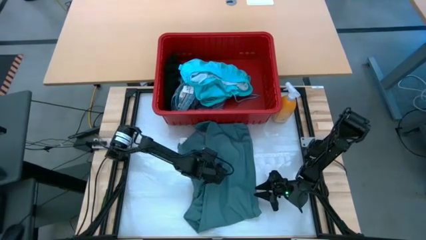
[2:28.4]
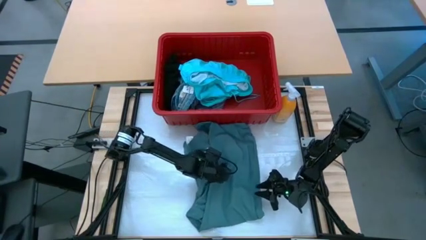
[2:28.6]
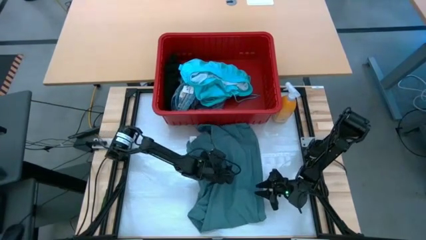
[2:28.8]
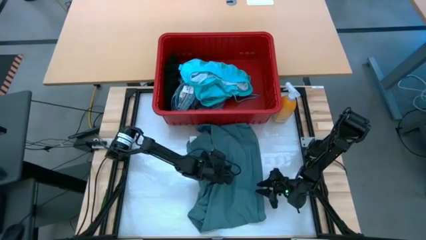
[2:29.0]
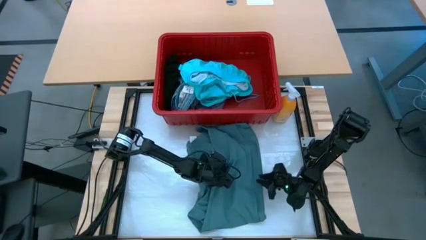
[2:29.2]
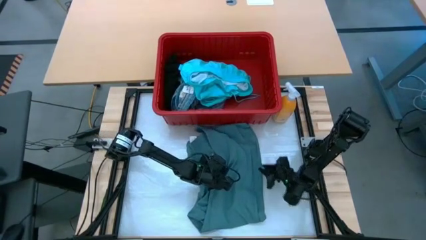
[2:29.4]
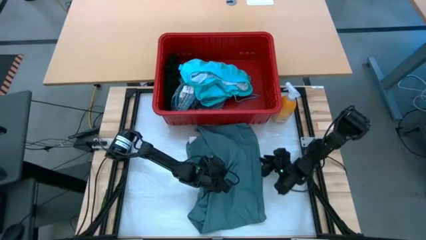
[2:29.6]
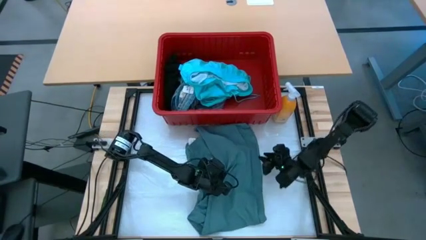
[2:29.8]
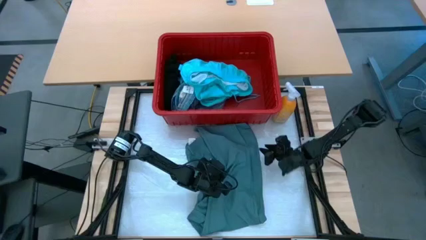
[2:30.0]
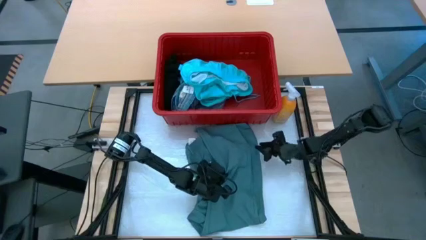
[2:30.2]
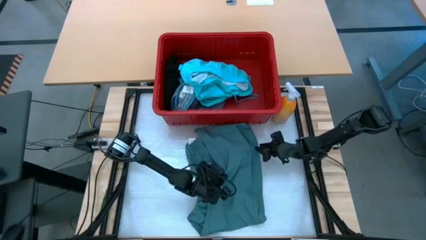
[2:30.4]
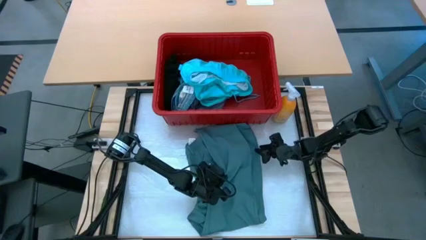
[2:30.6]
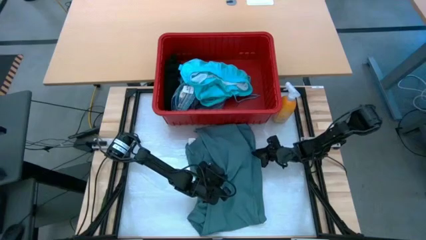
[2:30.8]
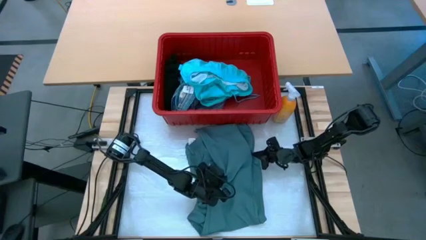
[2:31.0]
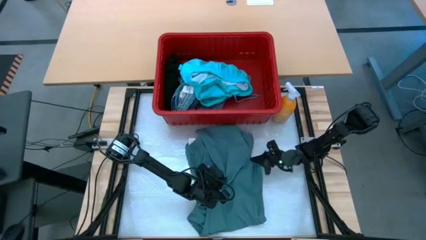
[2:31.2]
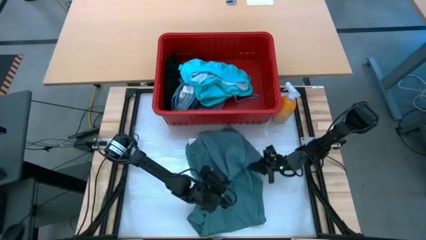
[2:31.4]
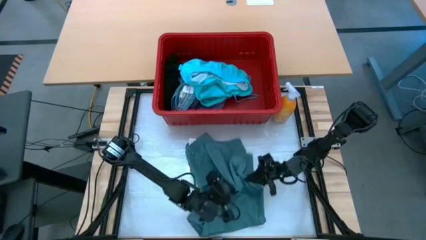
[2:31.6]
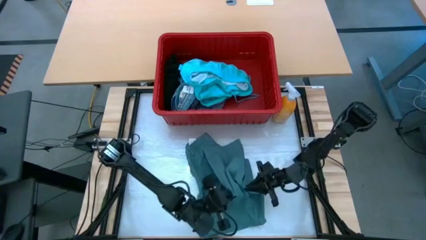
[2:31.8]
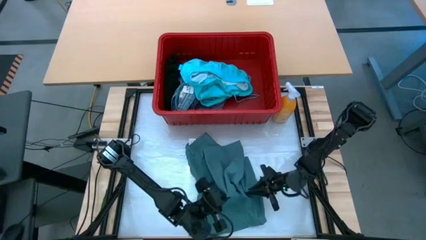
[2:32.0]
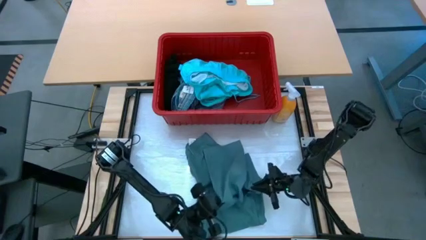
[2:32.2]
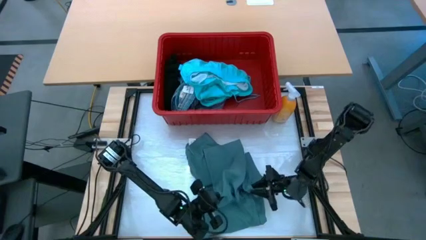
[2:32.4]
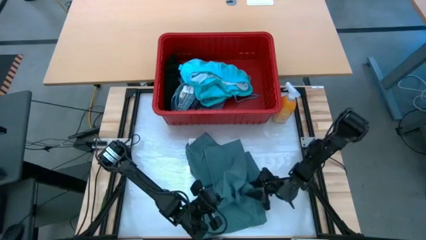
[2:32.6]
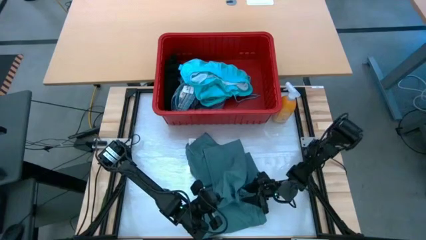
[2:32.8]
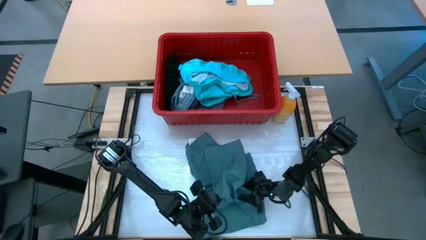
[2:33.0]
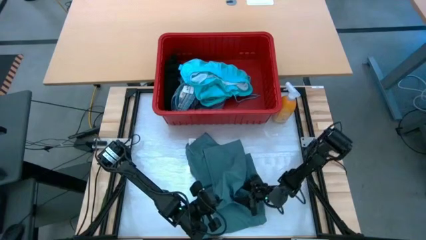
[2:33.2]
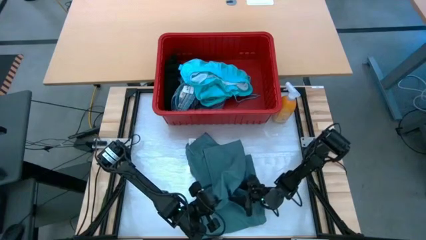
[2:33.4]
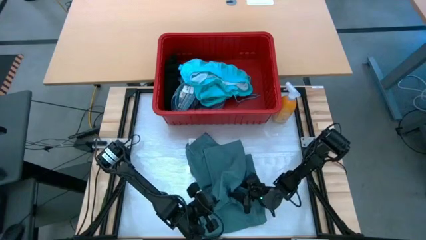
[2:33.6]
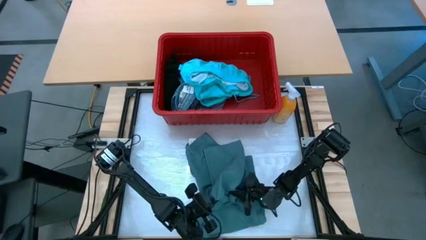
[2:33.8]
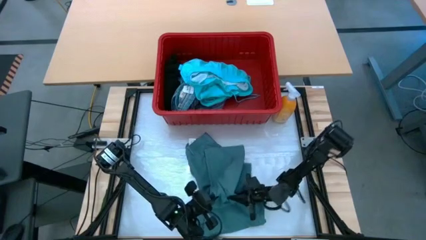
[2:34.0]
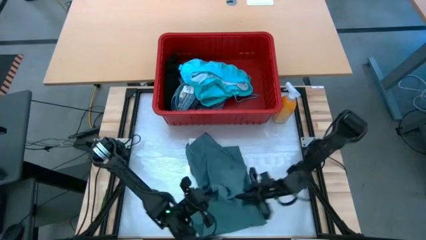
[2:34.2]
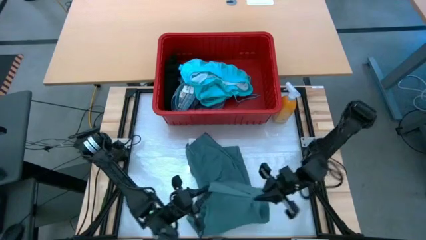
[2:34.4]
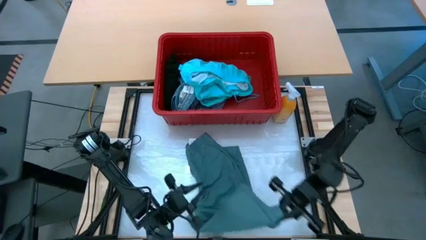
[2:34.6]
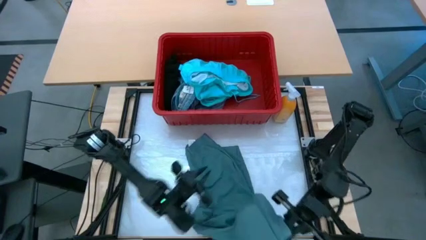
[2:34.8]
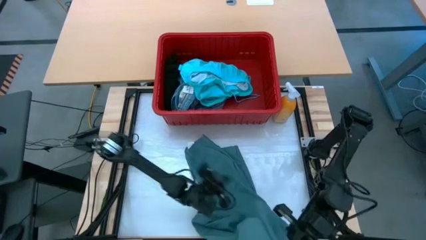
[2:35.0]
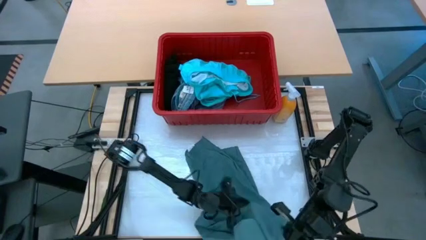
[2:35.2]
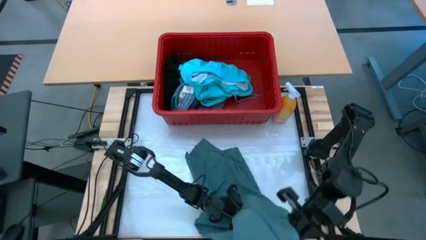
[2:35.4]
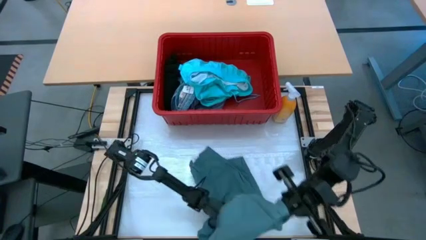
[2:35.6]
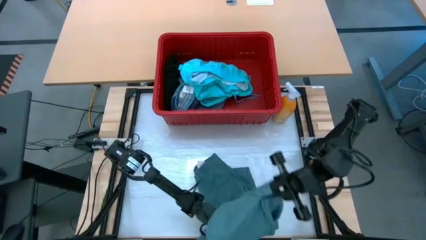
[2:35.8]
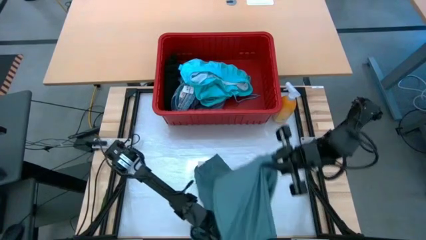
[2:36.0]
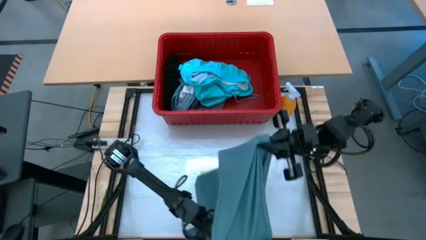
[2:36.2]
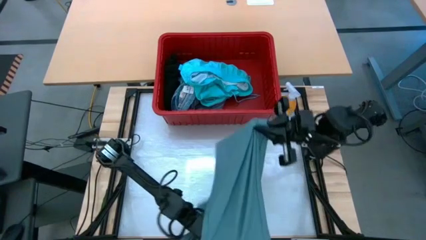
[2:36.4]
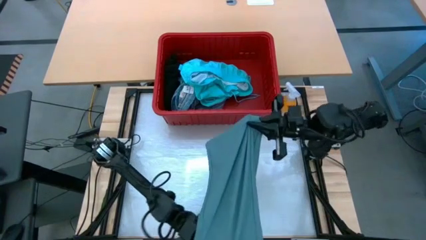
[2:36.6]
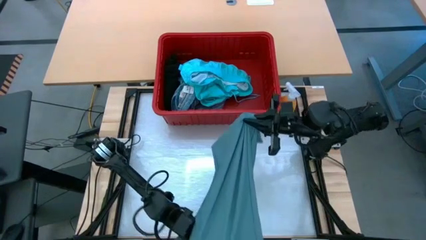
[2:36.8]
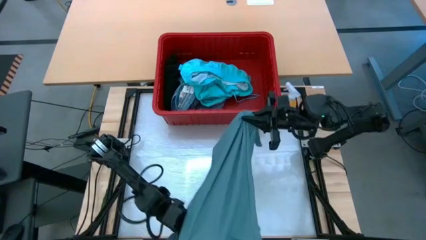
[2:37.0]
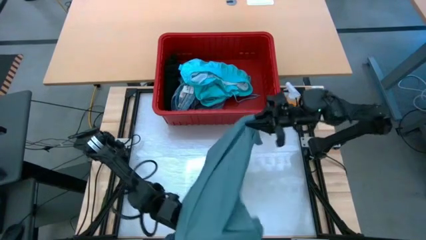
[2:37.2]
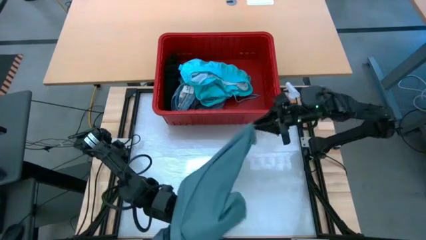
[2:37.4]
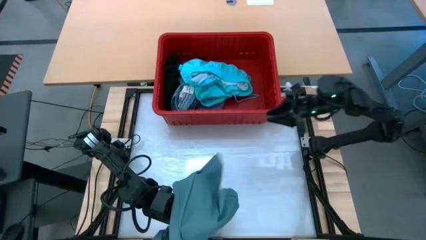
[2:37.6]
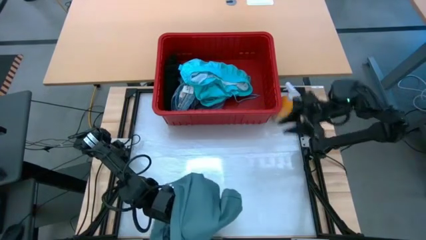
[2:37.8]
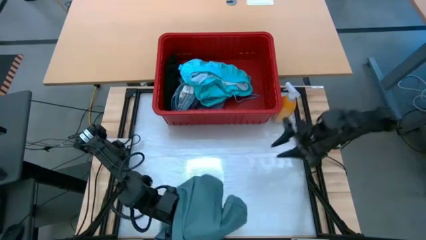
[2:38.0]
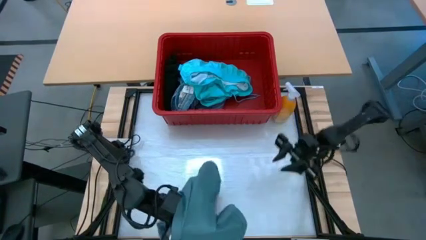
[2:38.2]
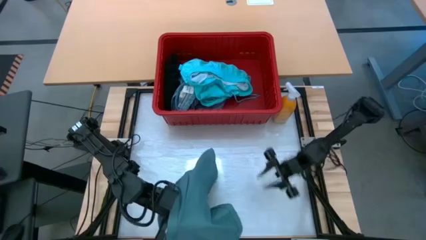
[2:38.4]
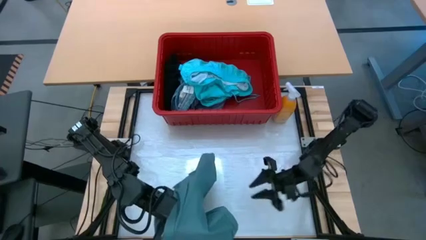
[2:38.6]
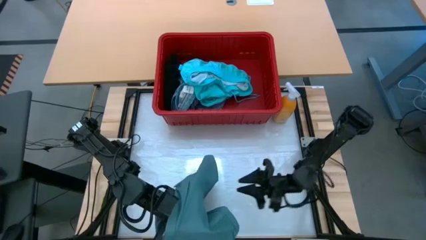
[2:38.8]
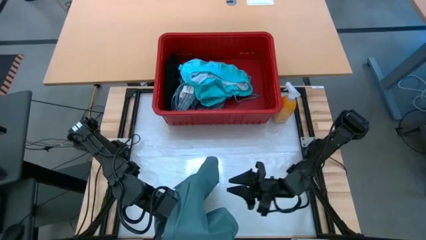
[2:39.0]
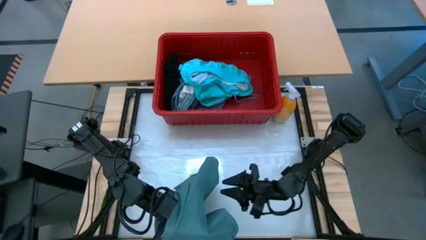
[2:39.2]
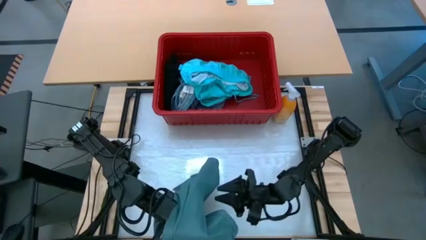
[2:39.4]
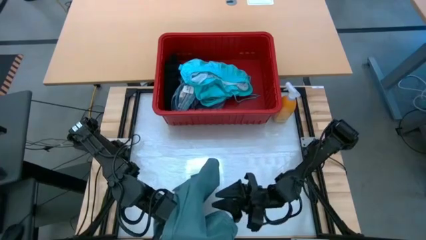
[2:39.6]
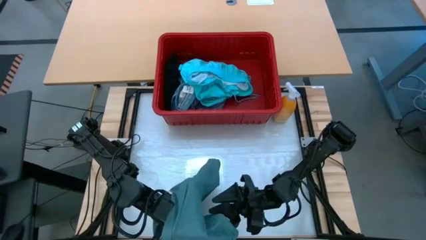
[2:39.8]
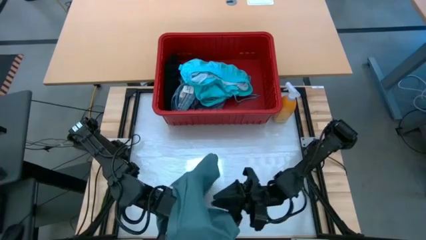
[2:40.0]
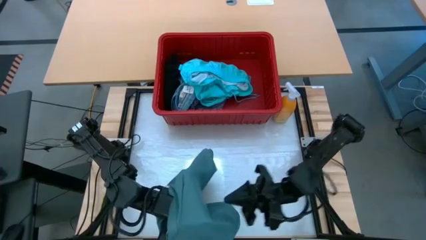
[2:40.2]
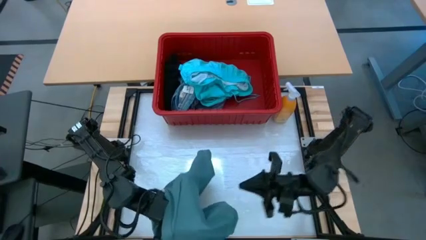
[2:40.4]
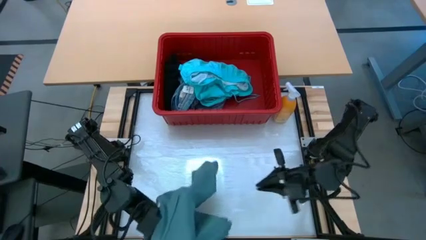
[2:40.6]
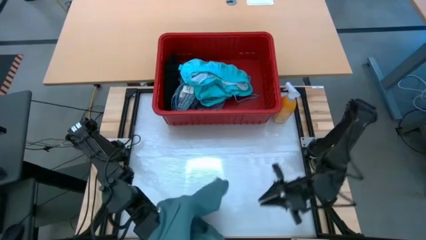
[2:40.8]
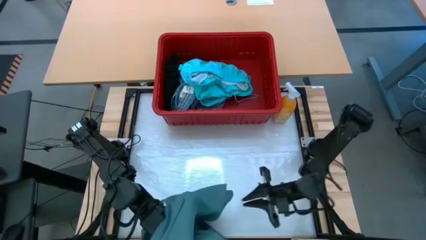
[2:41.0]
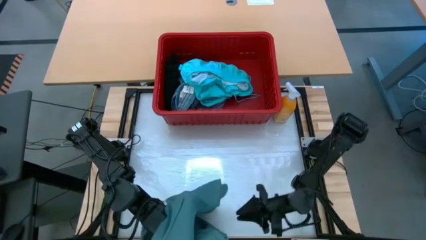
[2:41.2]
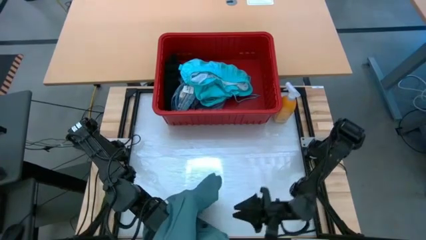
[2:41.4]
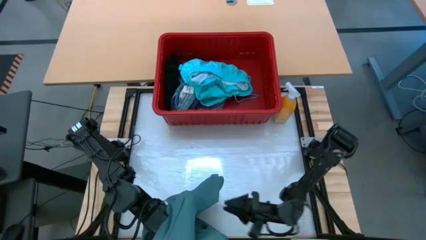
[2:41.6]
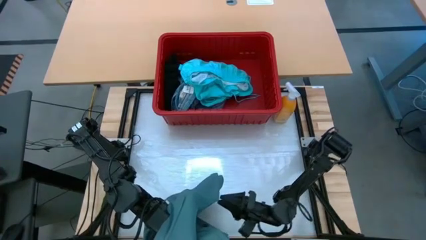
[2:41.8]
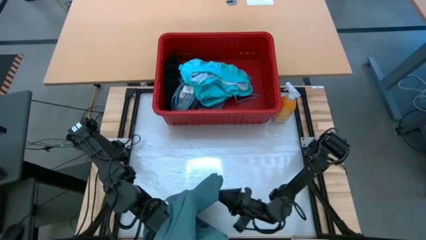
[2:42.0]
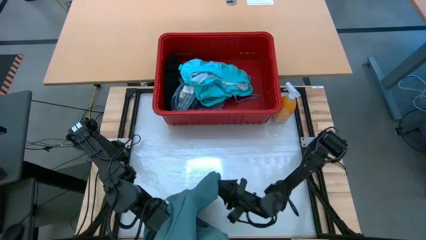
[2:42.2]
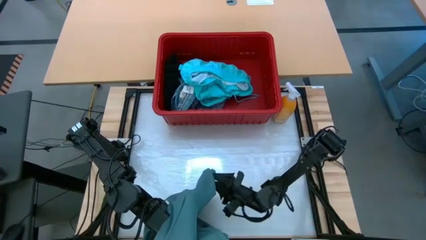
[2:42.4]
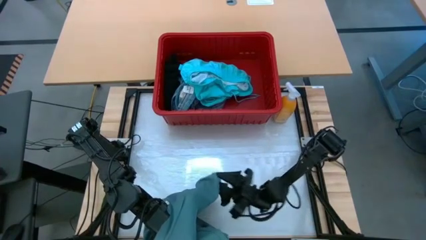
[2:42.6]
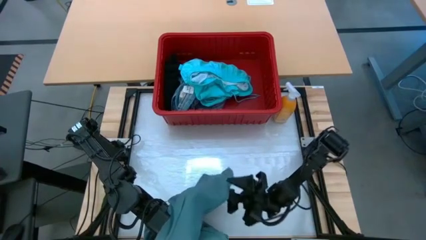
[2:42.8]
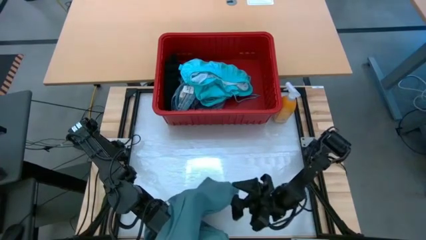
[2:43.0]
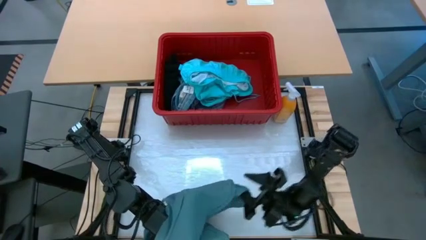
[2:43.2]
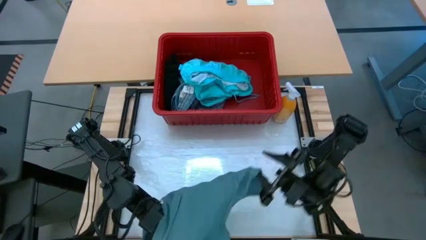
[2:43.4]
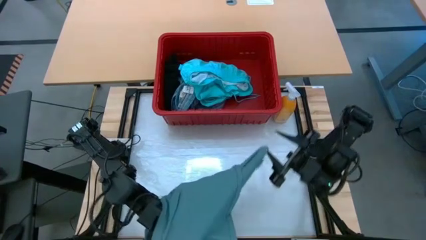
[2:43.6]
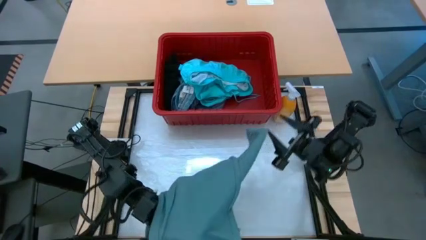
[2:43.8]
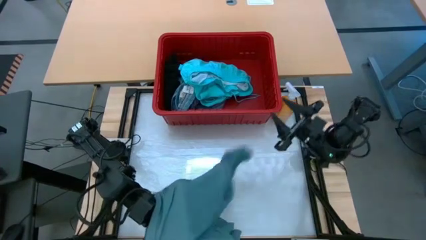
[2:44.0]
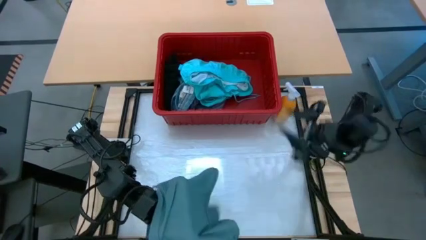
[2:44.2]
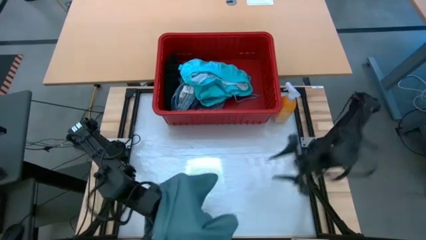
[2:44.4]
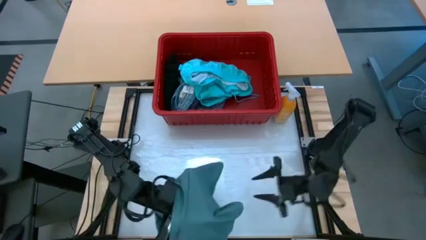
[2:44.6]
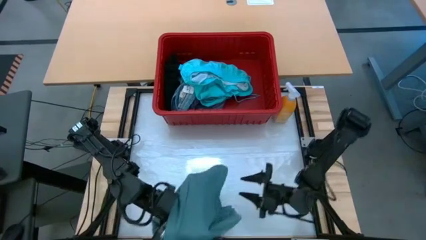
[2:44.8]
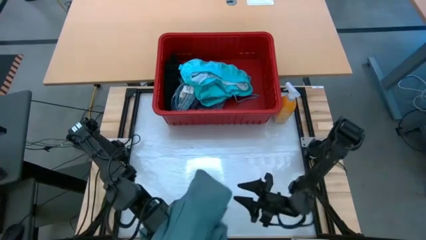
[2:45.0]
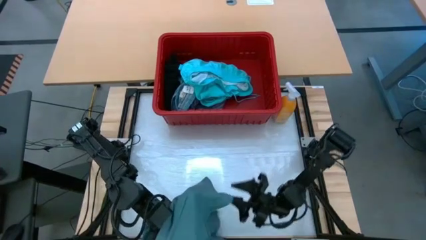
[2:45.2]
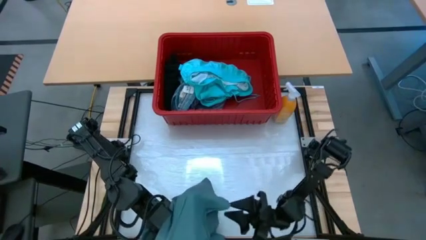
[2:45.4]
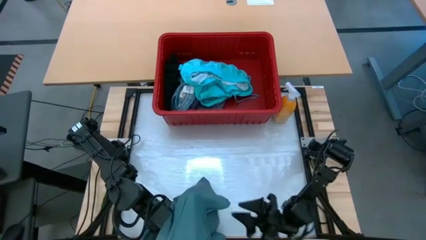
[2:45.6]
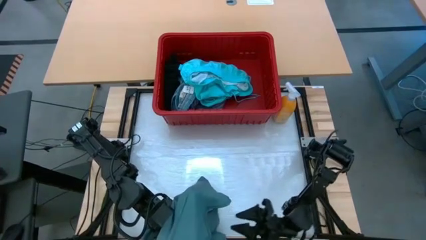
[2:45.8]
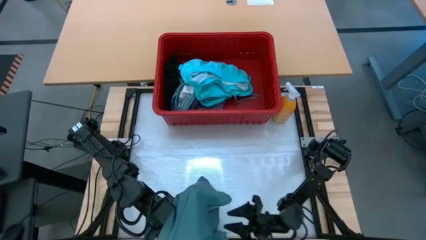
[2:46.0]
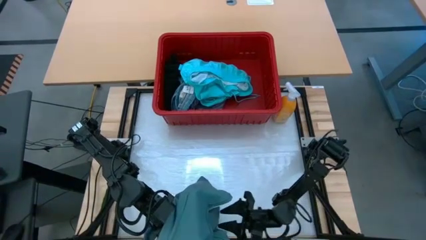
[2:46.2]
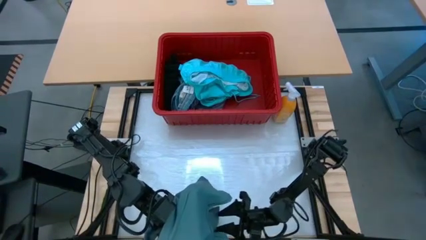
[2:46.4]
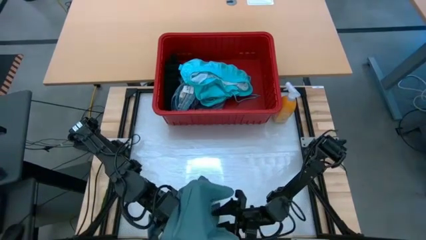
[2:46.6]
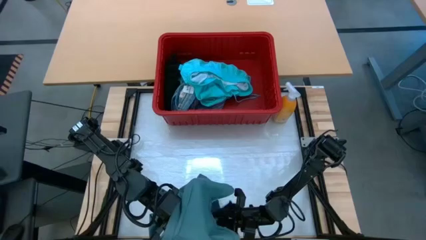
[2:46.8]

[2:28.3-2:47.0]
Task: Fold Laundry from Bin
Fold the light blue pants
